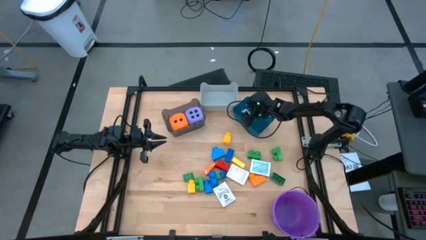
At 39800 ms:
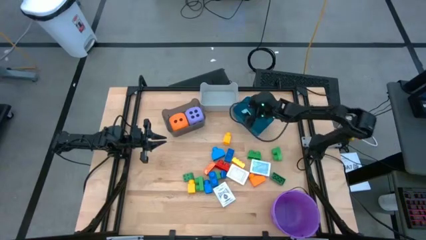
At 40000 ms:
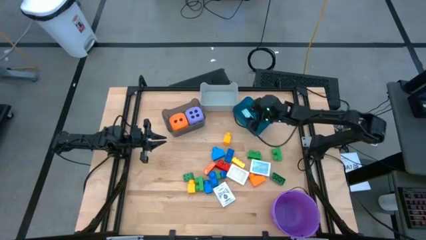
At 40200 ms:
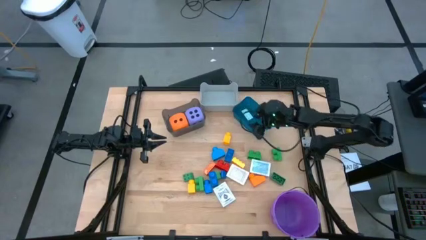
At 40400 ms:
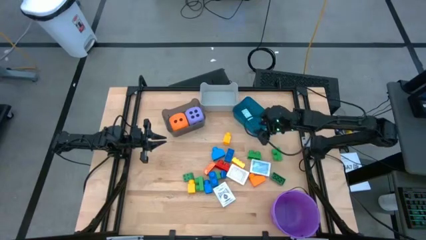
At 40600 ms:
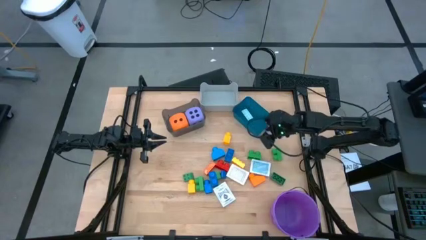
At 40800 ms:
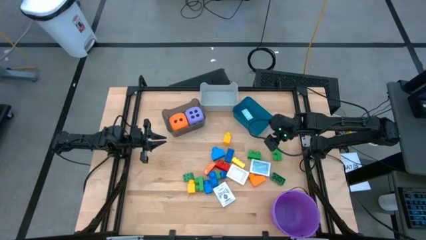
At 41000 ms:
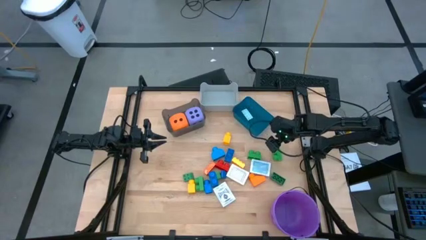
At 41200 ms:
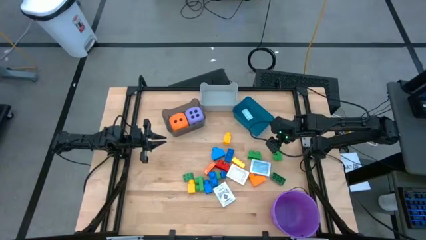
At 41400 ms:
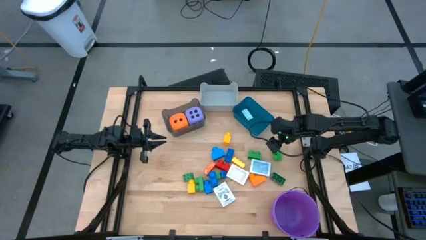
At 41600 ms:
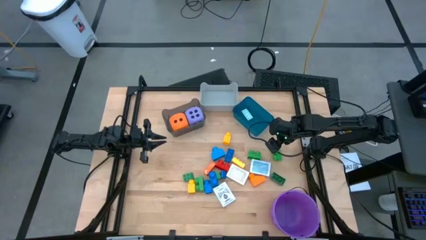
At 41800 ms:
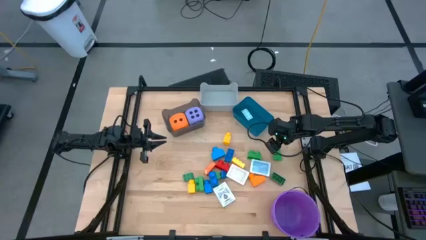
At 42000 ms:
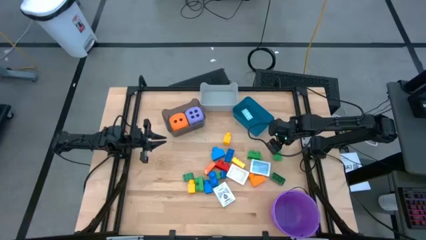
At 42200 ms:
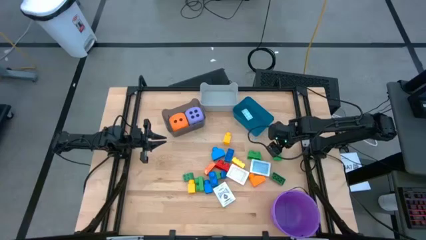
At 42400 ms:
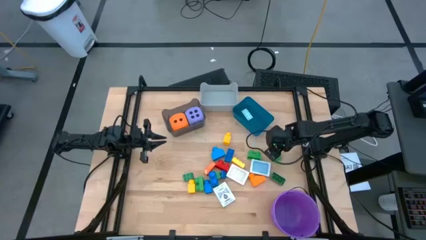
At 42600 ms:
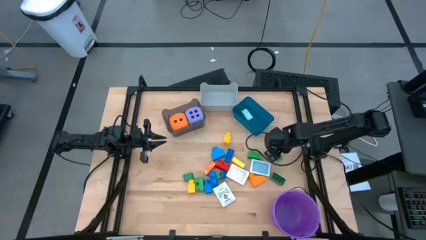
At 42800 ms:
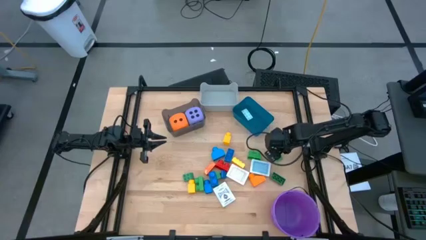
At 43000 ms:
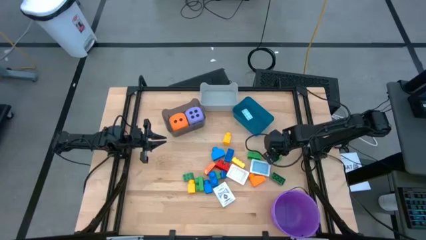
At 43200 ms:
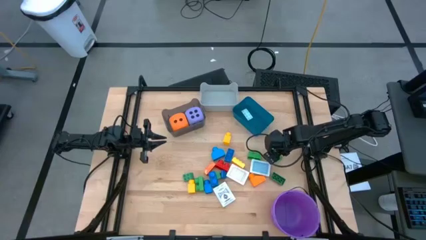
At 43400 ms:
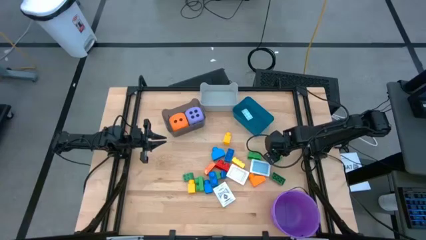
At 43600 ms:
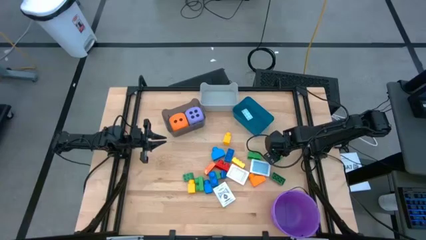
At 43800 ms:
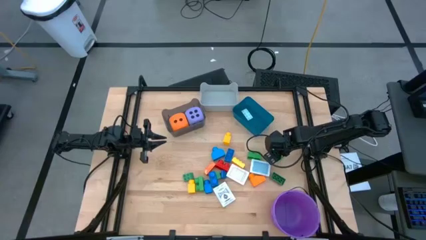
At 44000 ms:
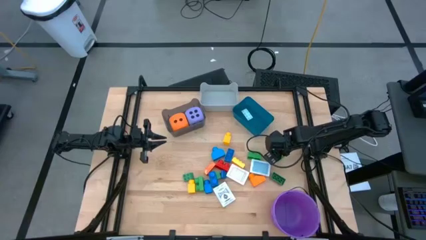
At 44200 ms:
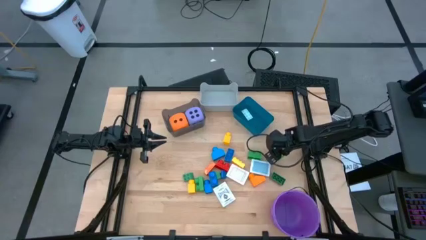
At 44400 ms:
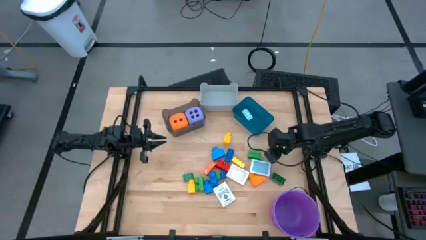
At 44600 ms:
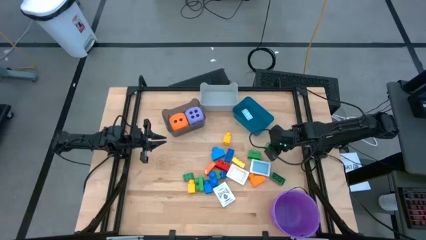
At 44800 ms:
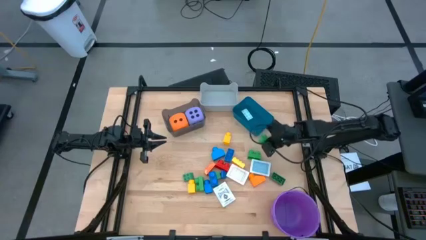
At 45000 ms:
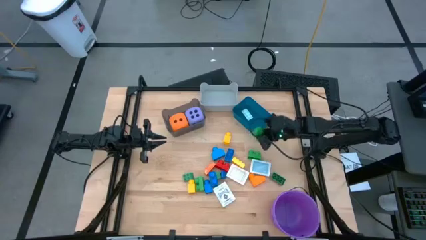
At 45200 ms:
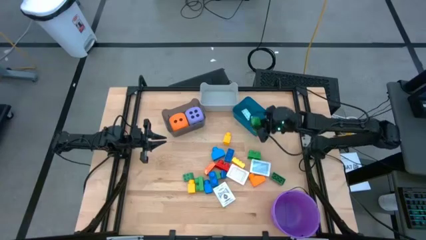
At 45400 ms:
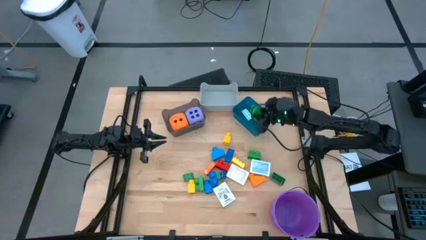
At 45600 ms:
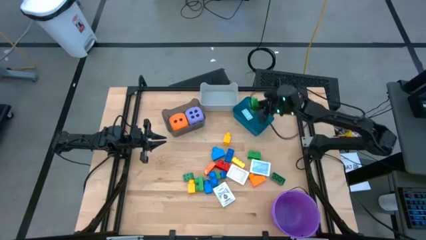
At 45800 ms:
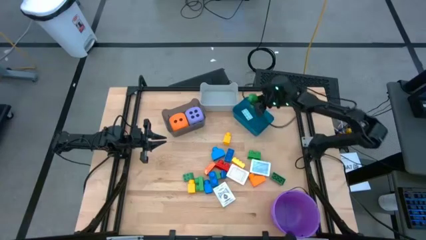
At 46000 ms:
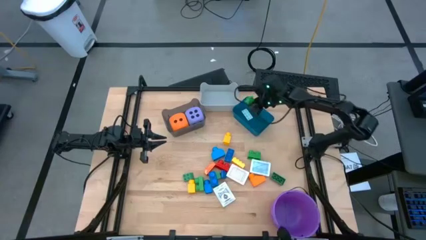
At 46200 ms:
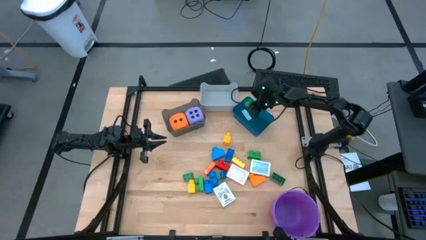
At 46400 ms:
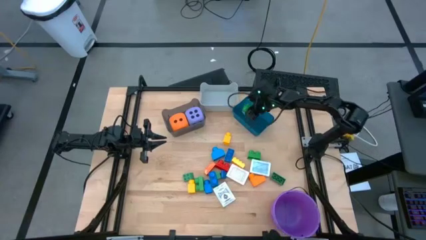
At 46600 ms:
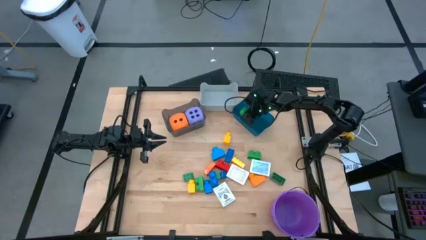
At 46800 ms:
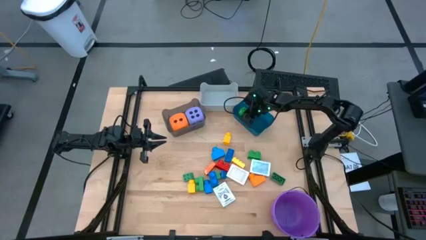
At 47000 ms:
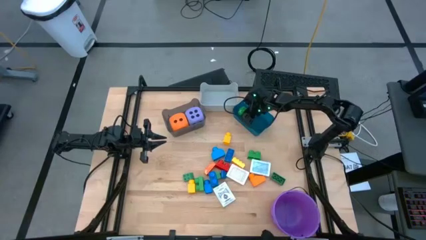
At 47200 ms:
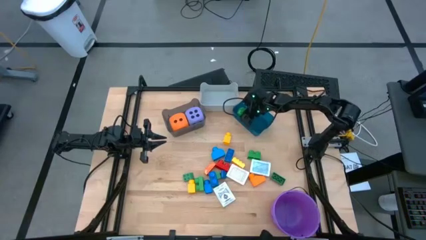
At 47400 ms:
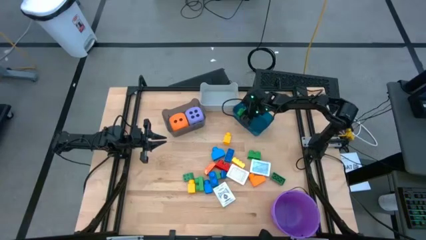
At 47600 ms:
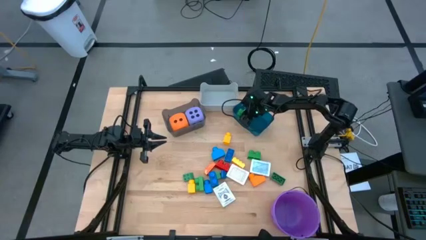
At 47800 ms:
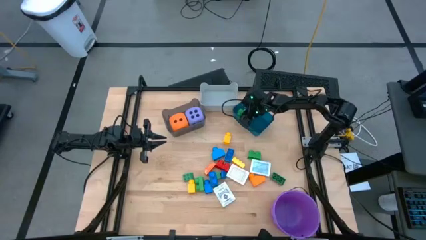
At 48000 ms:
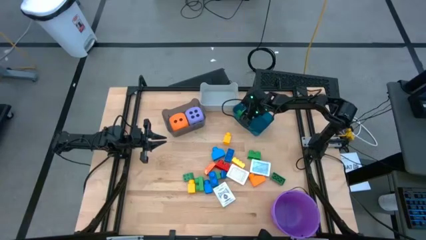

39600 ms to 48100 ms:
Task: Pick & Place Toys
Put the green right 2 studs game piece into the blue bin

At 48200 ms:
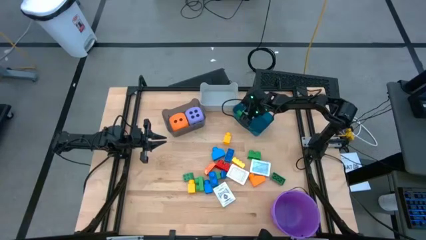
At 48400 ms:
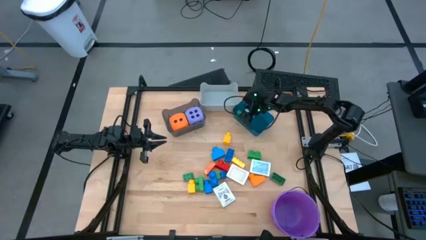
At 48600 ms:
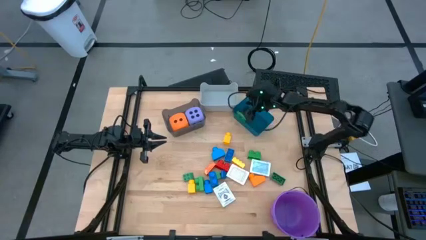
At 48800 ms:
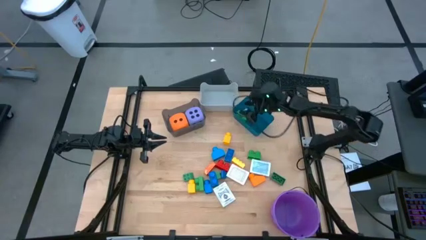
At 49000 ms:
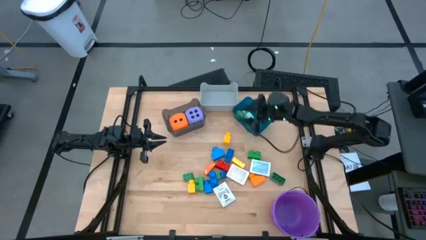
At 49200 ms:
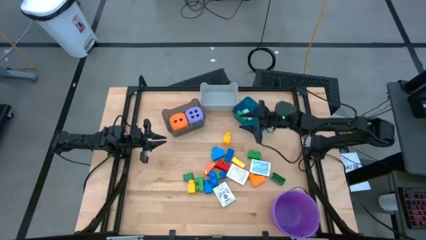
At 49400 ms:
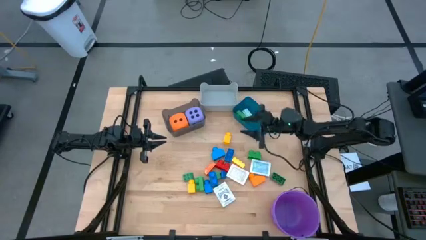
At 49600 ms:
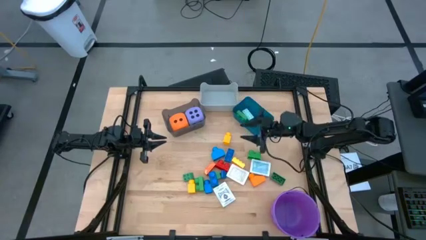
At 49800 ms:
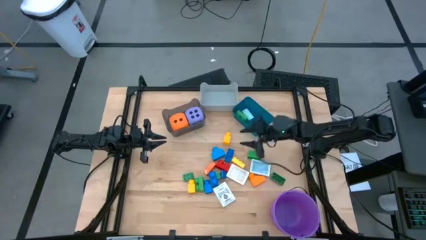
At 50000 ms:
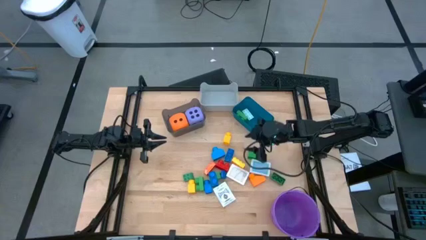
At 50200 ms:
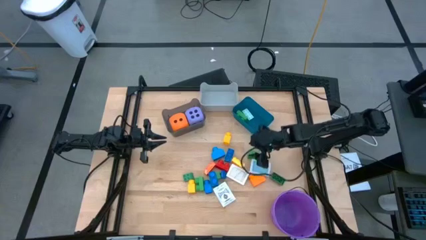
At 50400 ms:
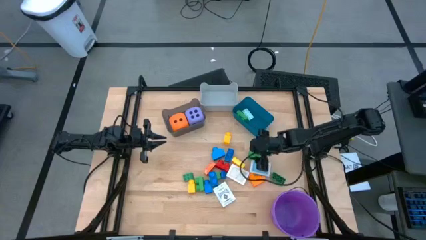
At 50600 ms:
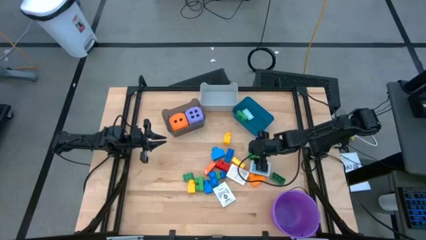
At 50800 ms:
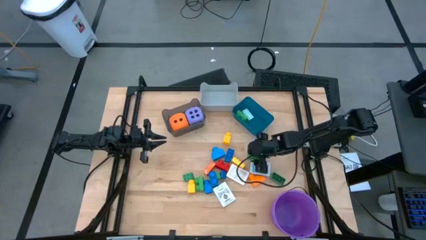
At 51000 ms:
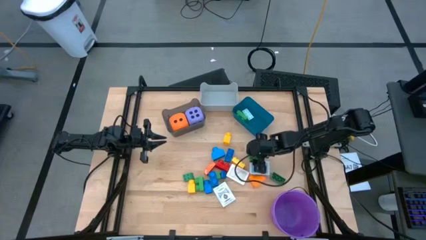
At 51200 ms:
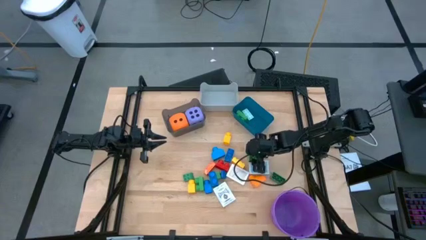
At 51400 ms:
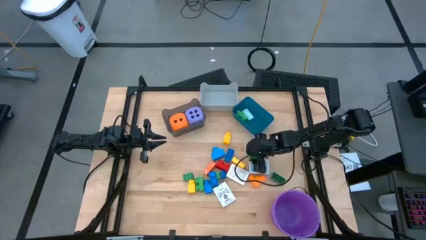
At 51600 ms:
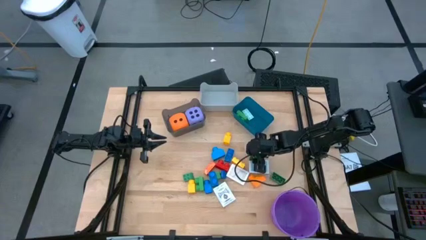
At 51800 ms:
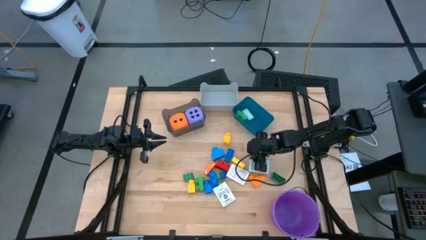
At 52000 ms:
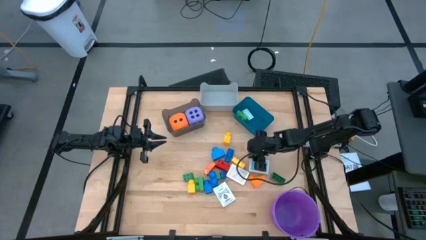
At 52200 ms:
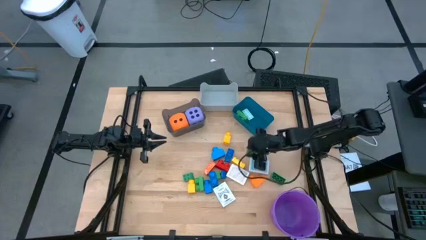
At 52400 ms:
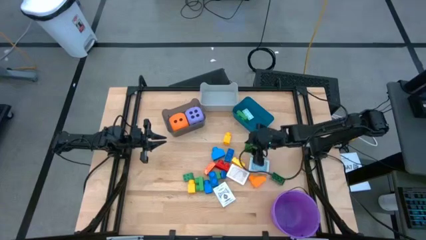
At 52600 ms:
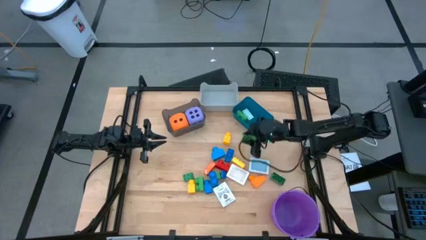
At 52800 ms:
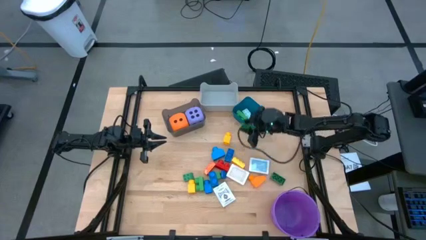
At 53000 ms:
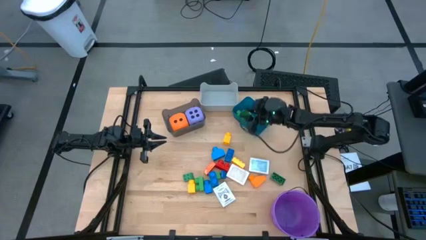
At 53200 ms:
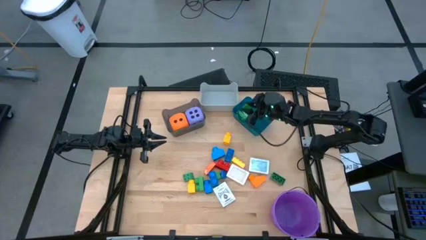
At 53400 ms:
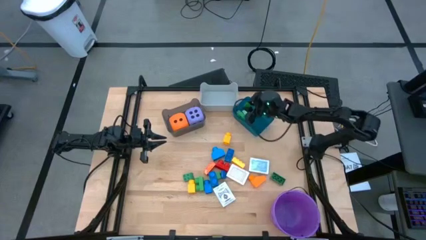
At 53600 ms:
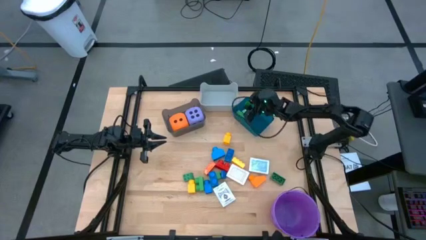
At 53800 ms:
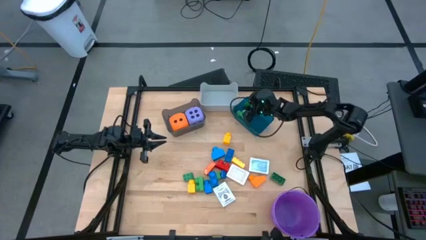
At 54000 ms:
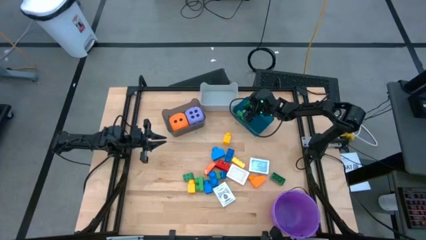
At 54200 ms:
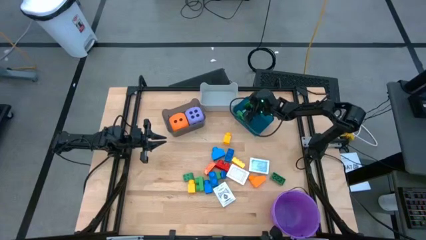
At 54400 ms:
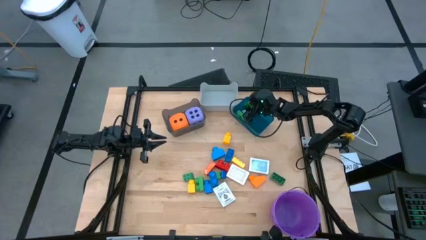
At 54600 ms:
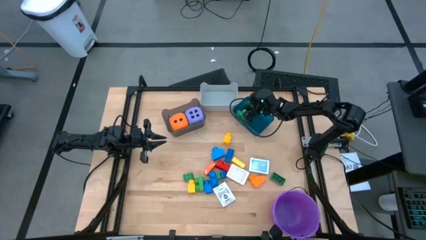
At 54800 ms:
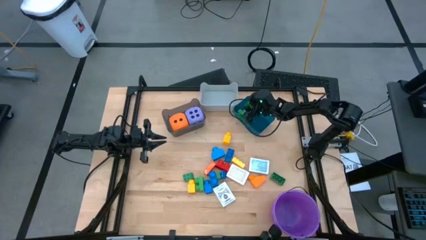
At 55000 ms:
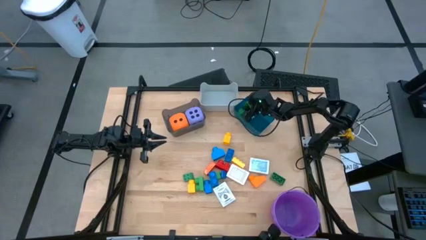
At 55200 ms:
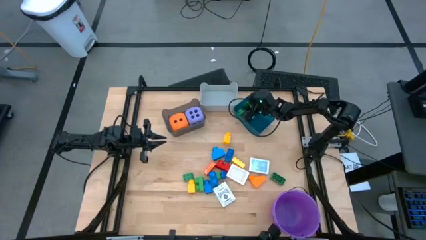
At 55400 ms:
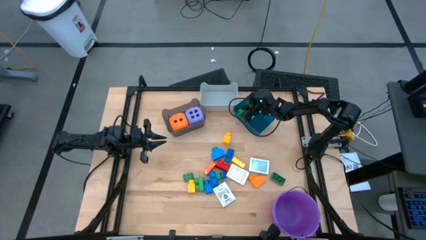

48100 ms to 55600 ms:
Put the green 2 studs game piece into the blue bin
